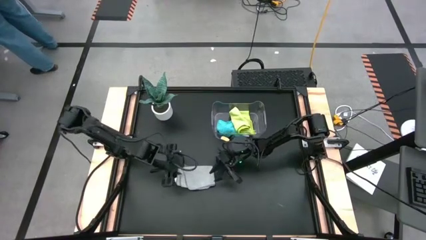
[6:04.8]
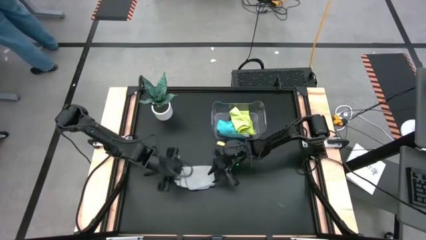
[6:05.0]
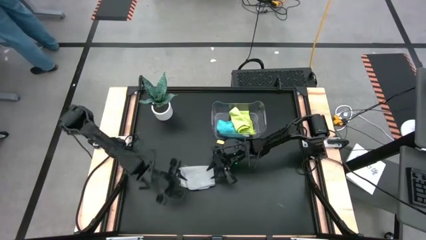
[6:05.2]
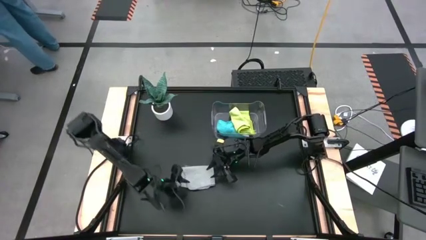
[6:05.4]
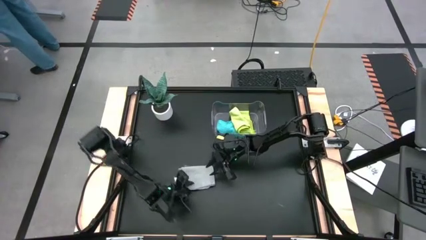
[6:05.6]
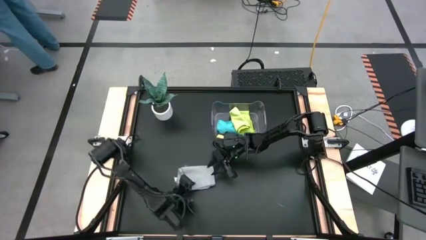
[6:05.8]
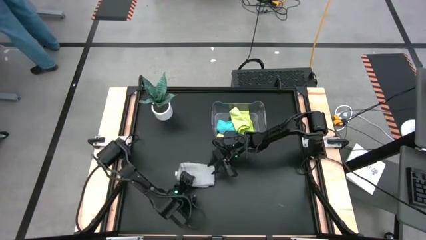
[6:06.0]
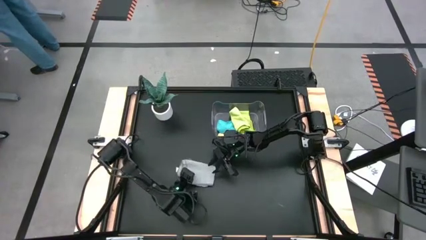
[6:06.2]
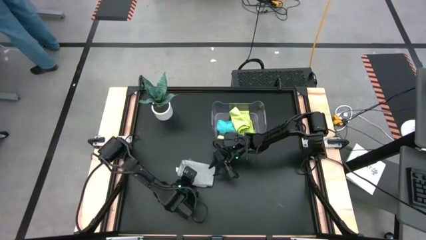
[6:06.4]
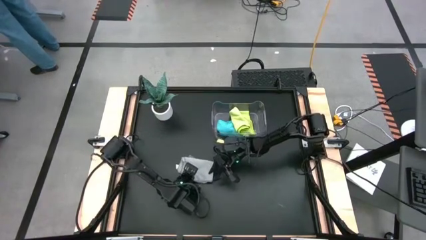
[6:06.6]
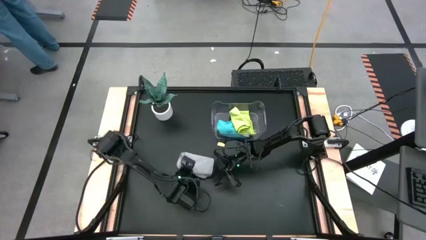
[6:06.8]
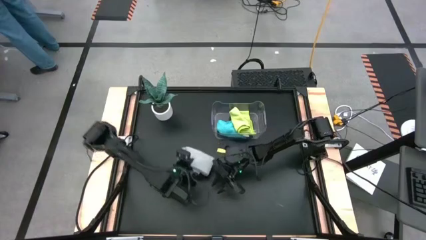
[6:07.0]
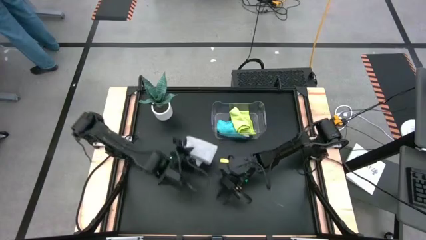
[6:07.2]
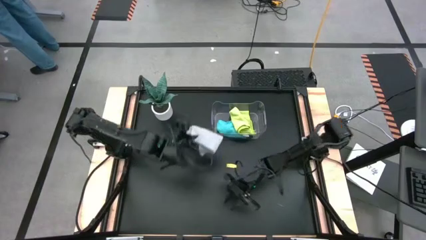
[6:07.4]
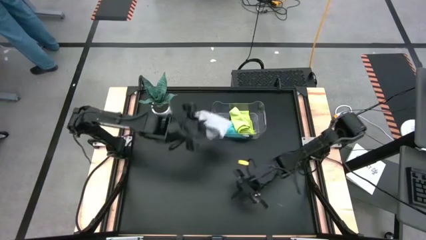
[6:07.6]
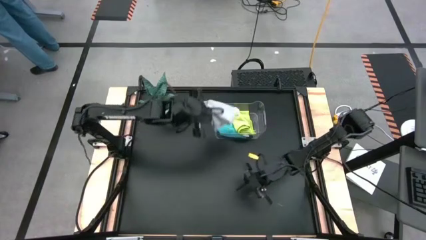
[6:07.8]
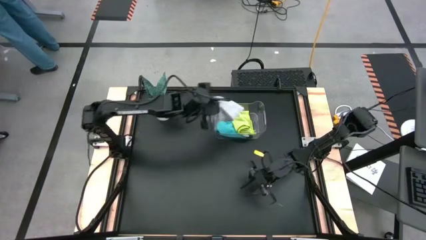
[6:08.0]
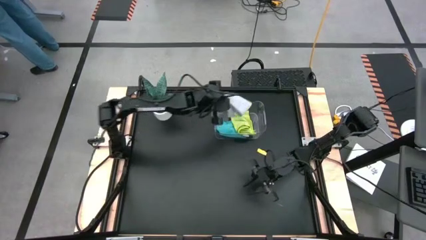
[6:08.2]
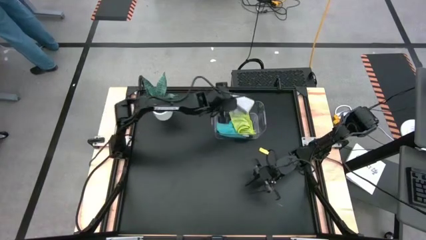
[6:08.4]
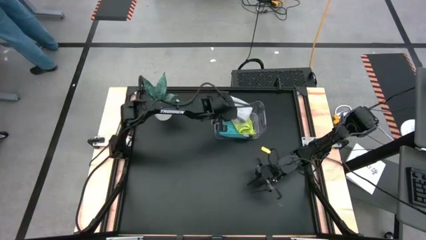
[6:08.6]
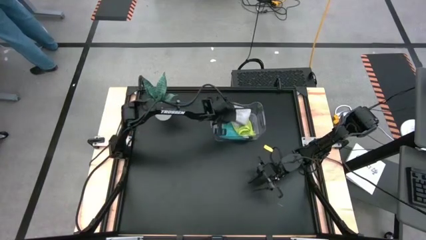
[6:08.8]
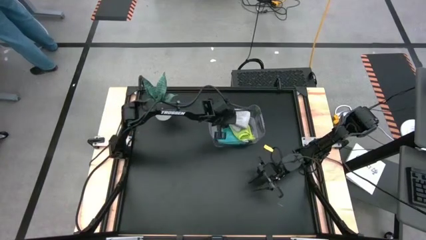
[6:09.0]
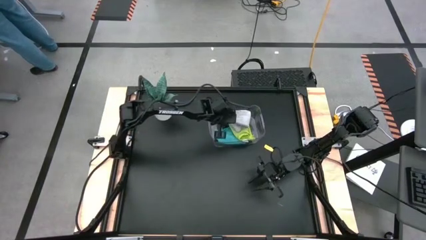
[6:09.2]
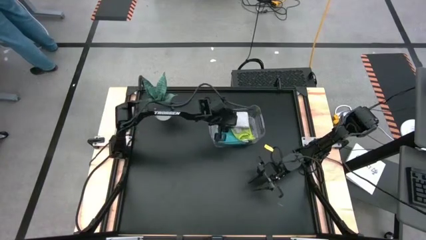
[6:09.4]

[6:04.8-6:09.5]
Task: Fold microfiber towels
Put the gray towel into the bin

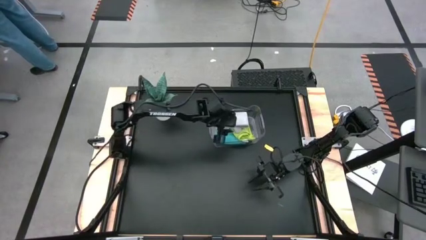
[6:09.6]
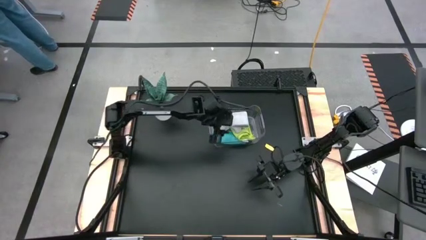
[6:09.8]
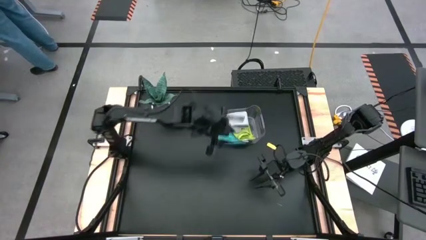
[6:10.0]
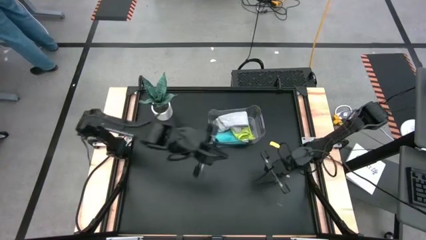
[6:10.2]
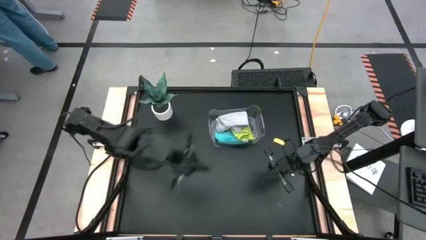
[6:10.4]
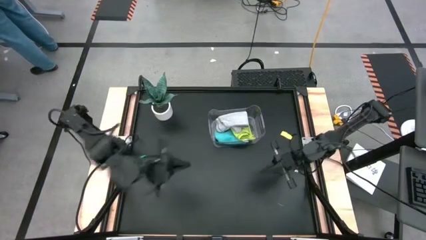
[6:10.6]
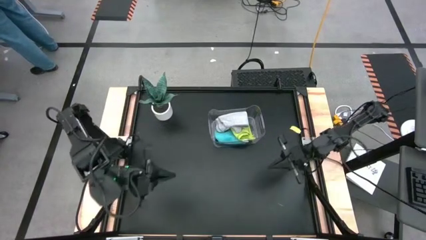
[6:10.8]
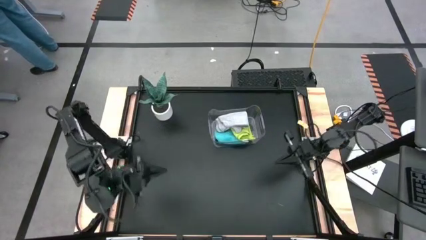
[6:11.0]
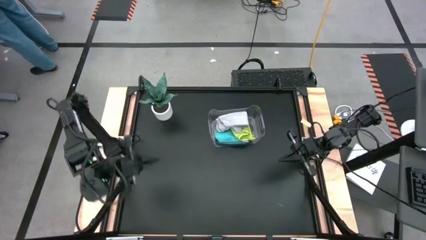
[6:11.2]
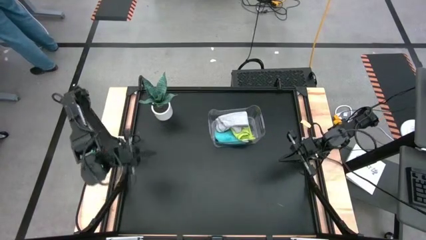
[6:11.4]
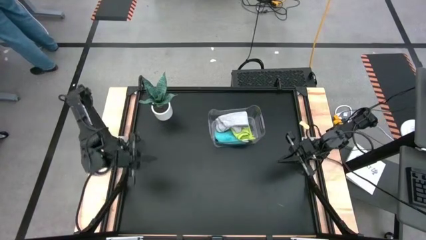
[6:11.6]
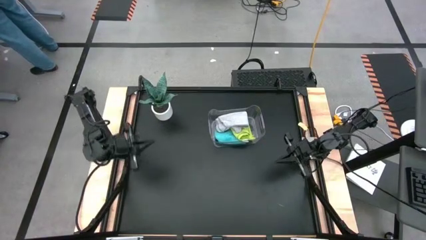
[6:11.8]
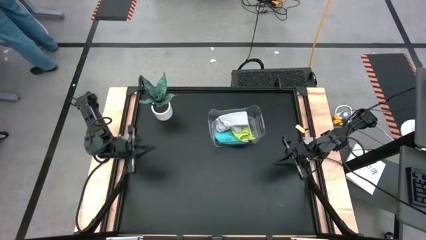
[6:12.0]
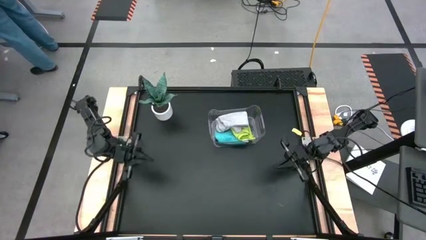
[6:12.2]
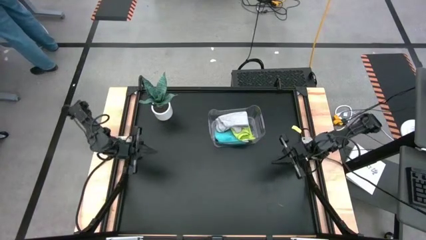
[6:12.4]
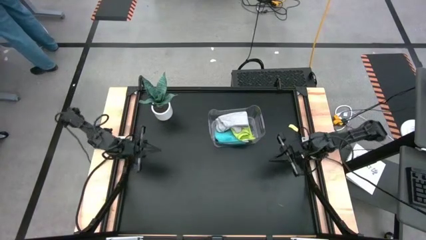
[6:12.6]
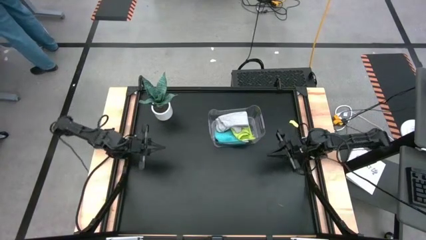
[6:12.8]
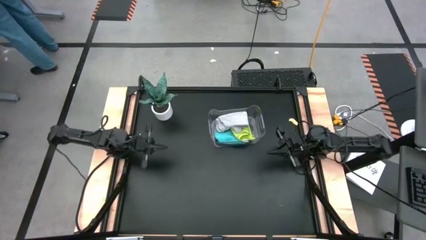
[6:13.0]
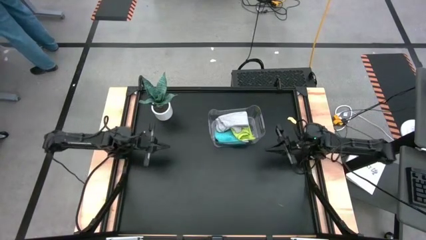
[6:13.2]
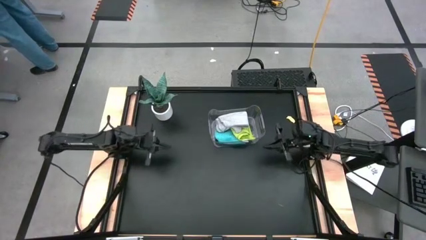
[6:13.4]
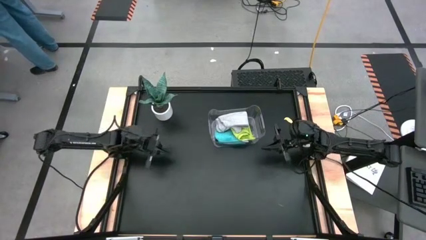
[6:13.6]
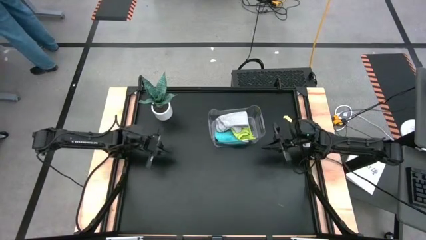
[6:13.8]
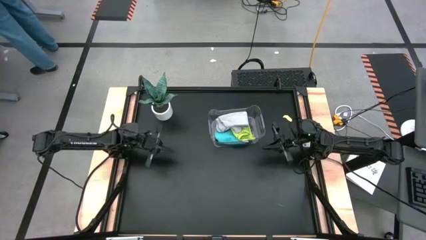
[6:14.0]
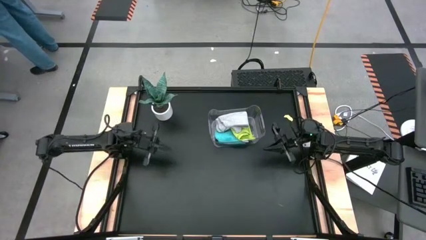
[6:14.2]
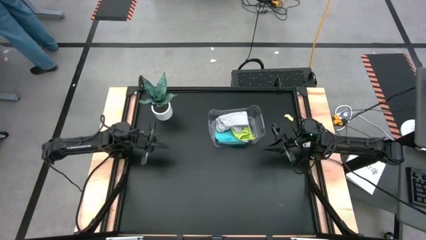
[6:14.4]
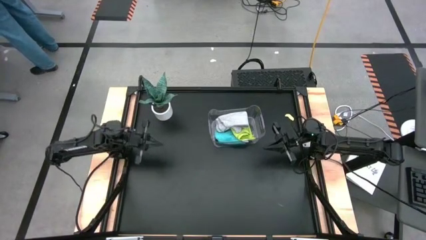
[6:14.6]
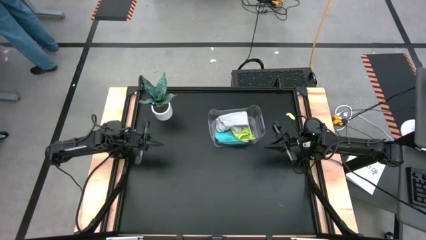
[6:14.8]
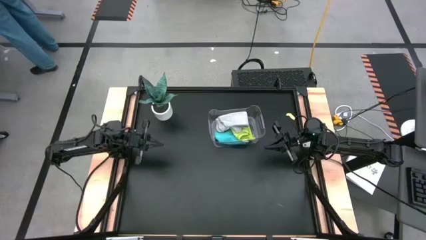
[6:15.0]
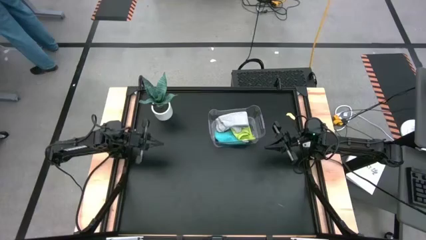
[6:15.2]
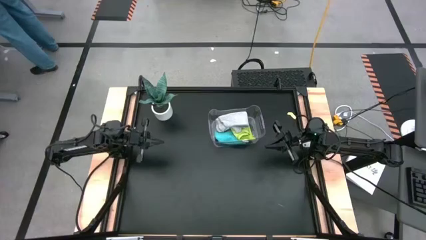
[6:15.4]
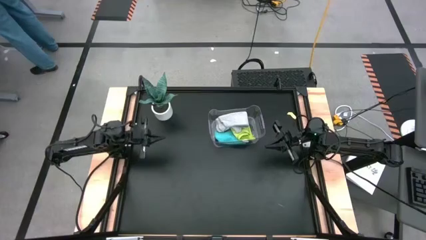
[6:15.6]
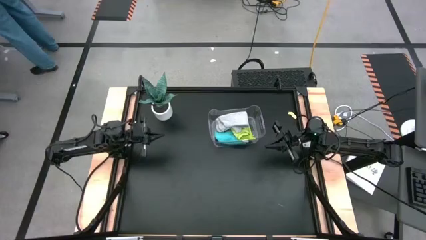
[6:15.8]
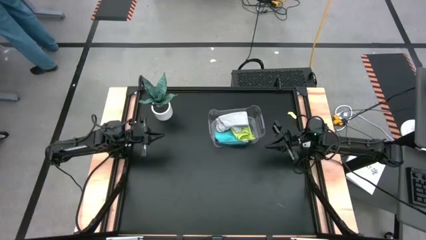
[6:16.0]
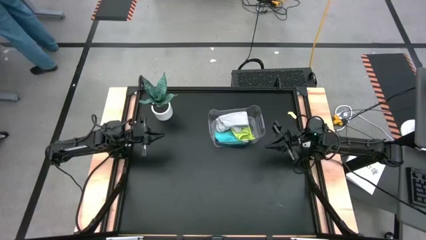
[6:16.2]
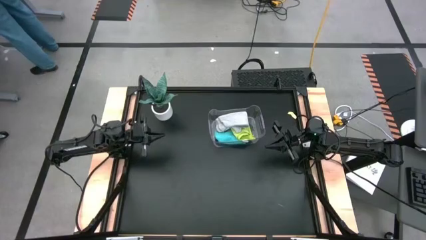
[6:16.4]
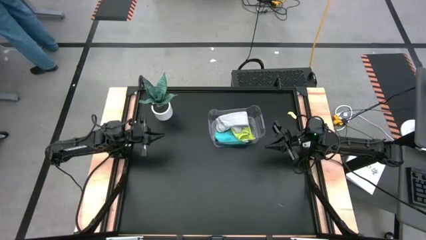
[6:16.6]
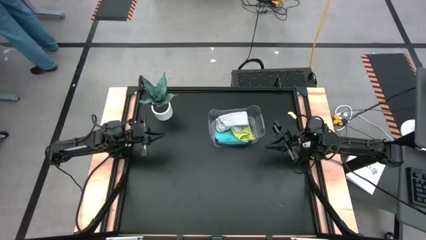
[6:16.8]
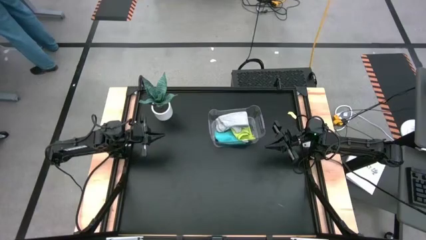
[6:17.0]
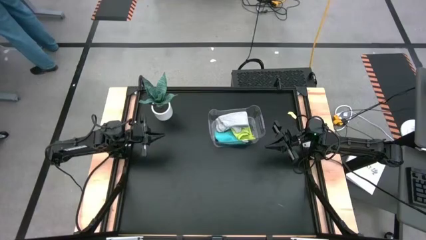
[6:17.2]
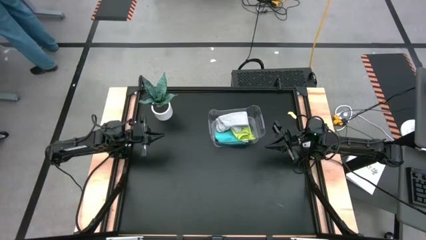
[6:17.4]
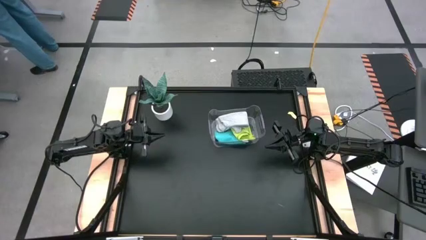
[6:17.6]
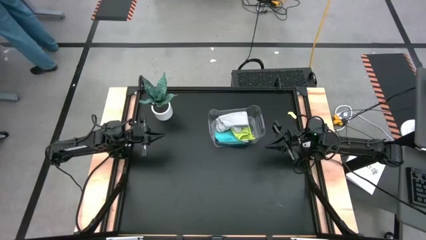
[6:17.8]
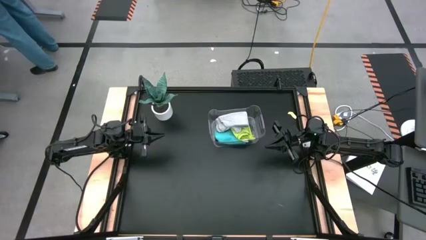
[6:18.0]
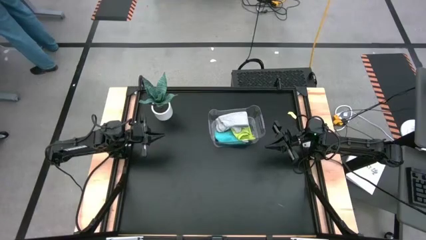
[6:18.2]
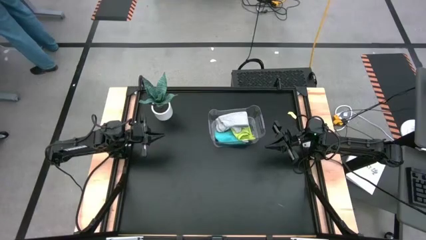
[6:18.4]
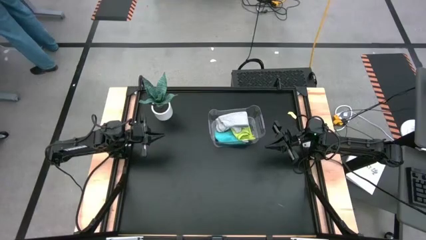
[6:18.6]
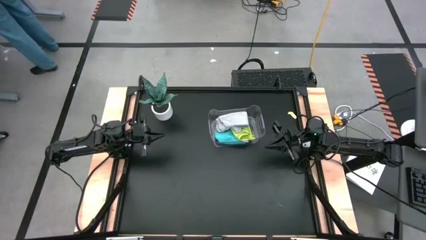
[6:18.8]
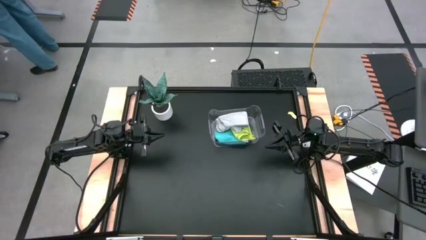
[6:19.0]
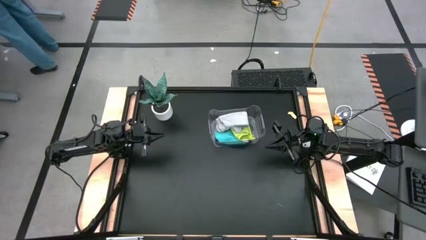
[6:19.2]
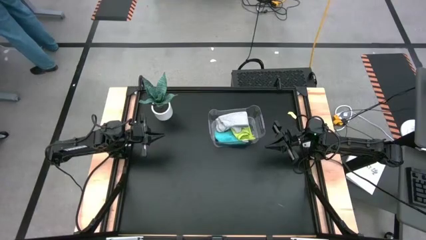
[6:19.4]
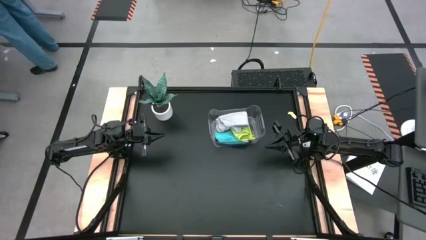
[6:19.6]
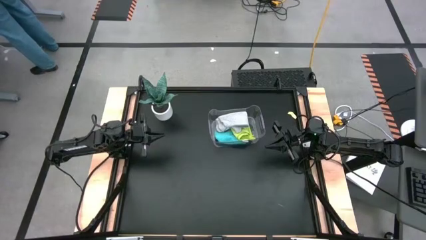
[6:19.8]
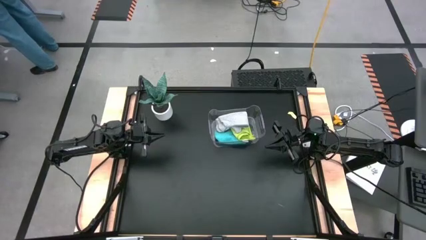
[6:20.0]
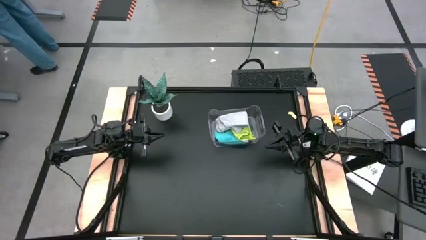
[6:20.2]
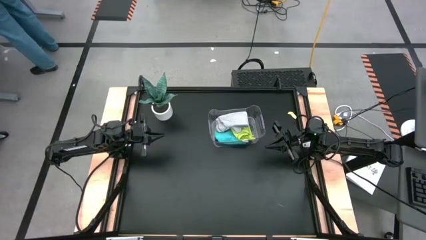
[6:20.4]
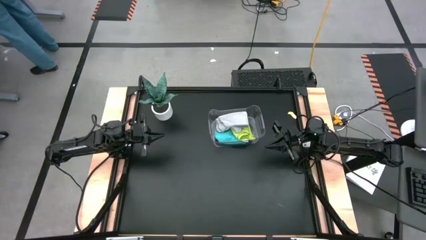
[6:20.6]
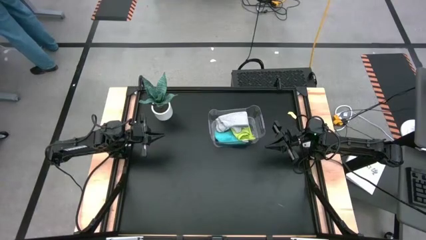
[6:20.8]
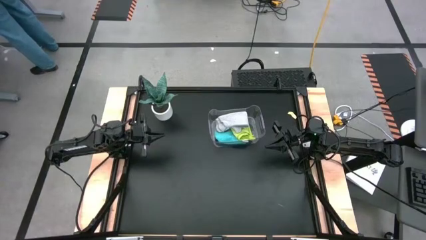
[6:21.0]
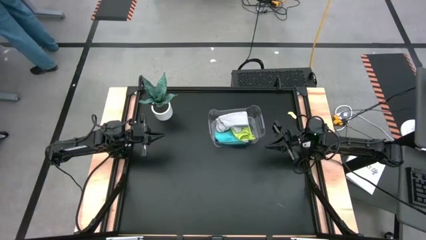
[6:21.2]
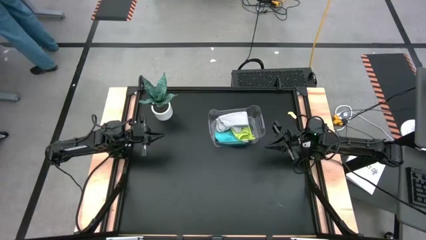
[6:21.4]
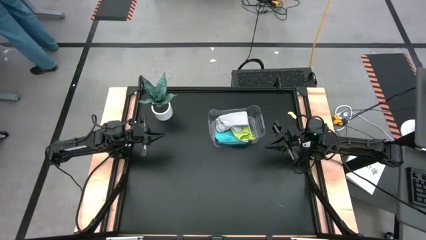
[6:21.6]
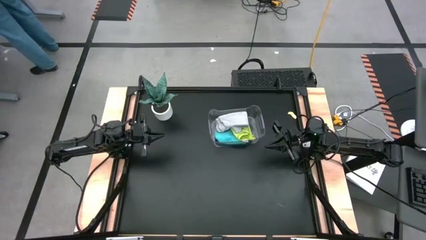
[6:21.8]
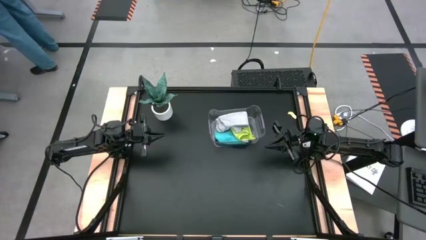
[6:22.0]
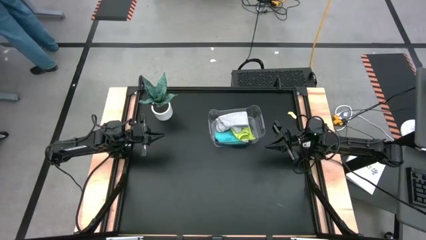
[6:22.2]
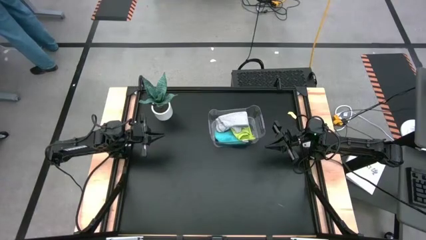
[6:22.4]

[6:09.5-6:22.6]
Return to Home Position
